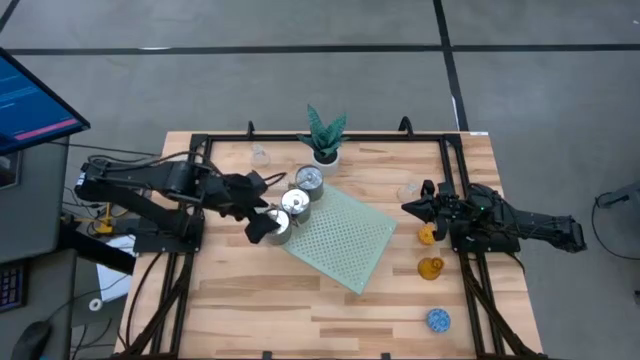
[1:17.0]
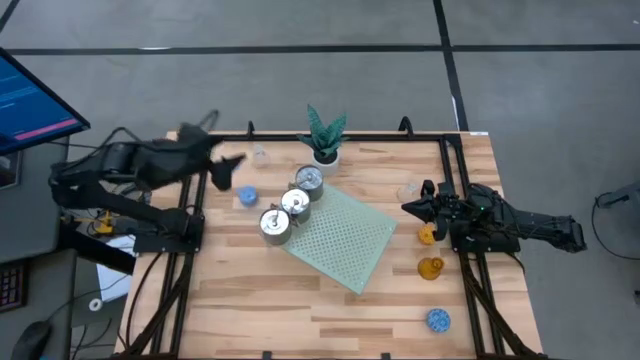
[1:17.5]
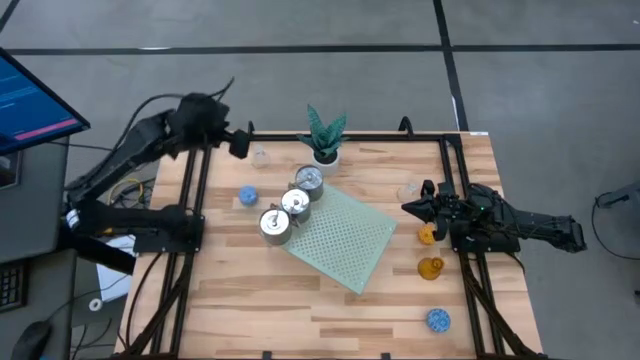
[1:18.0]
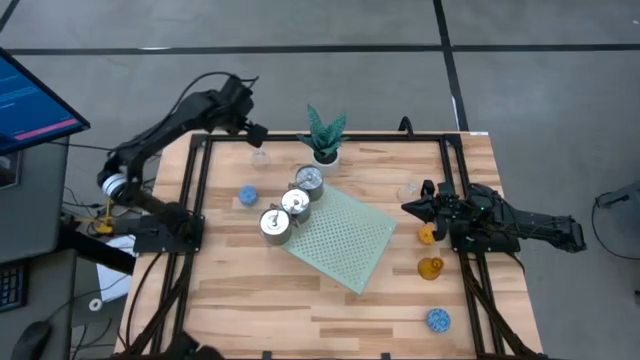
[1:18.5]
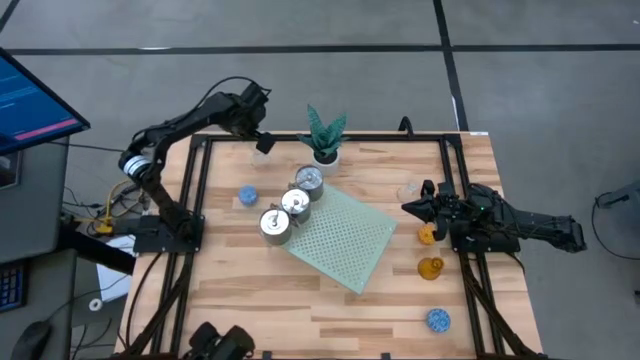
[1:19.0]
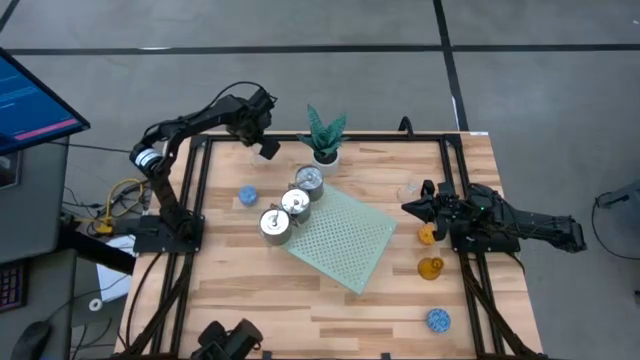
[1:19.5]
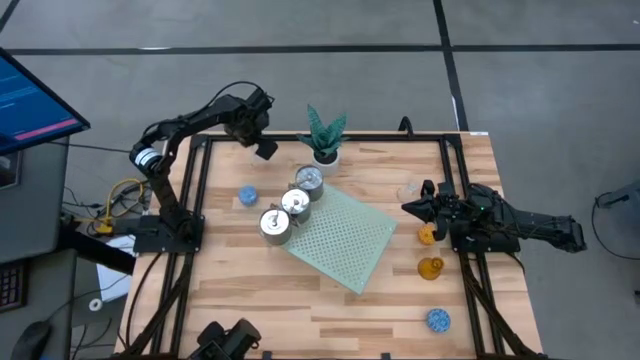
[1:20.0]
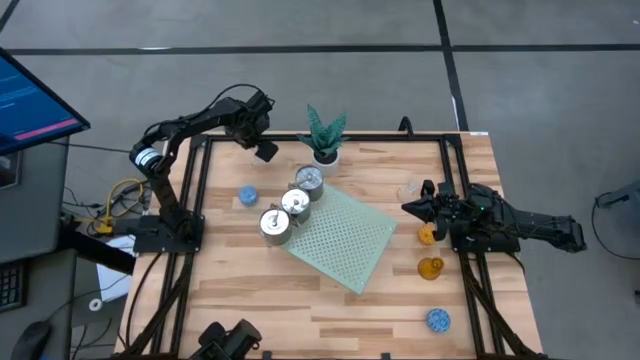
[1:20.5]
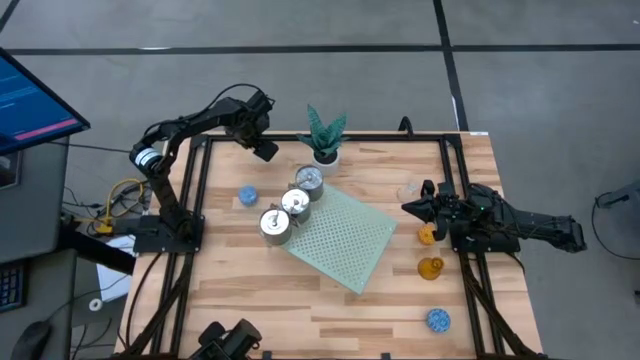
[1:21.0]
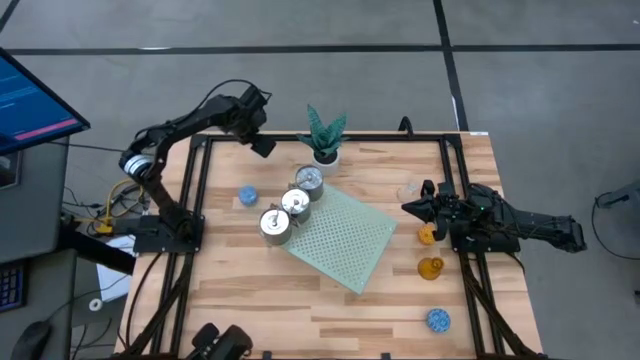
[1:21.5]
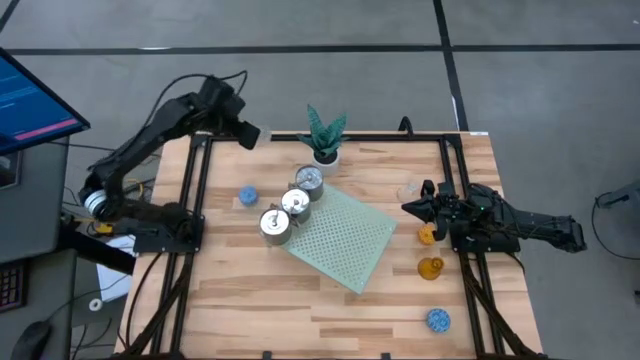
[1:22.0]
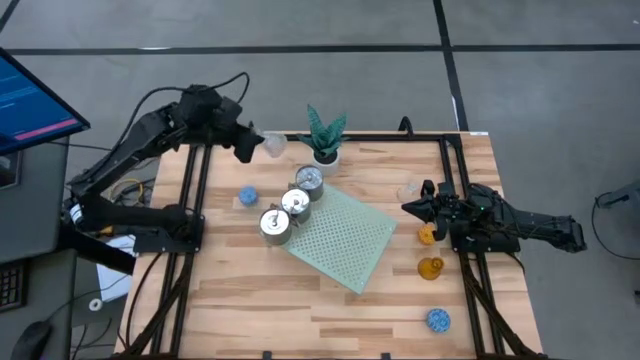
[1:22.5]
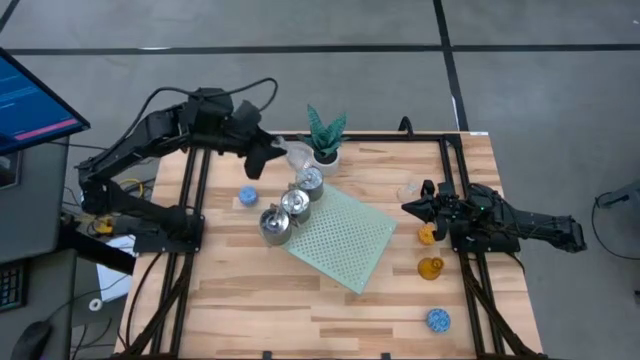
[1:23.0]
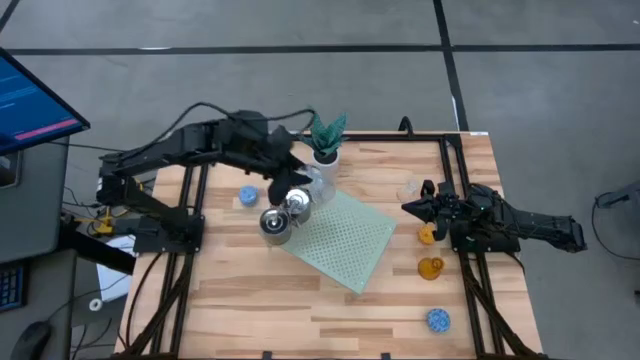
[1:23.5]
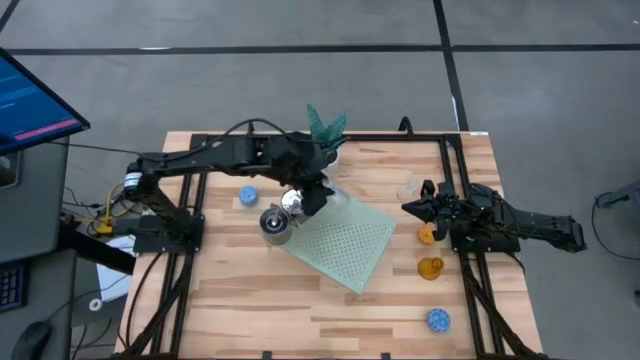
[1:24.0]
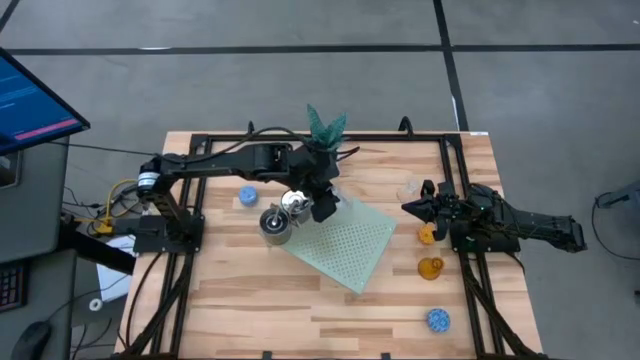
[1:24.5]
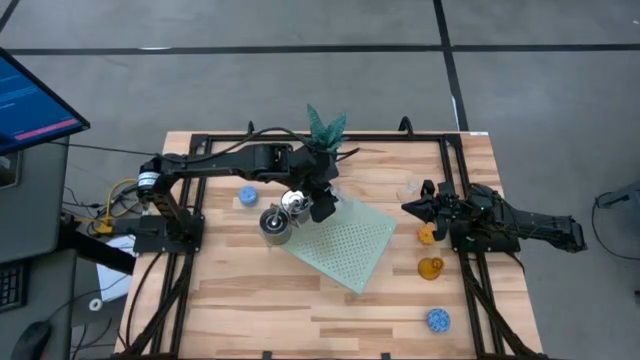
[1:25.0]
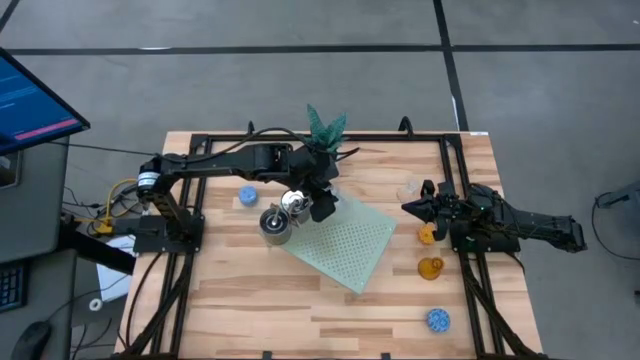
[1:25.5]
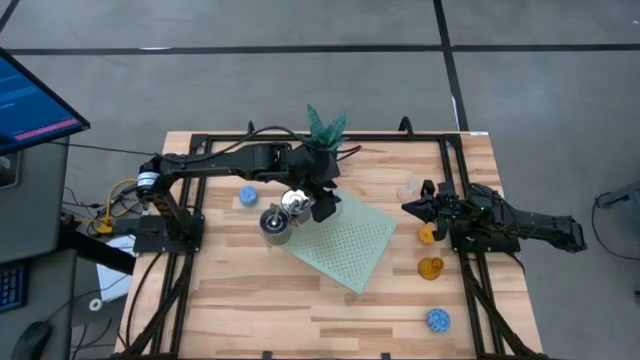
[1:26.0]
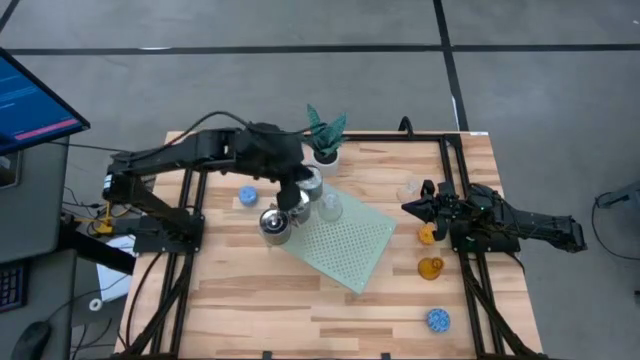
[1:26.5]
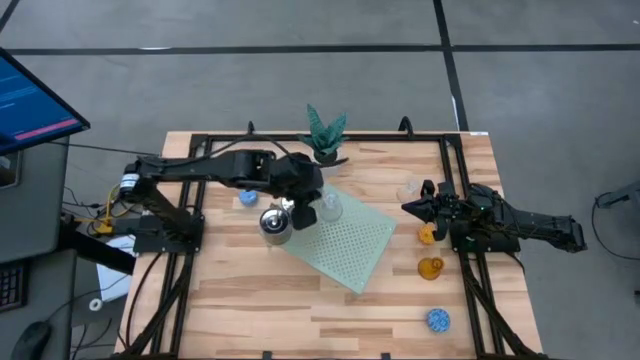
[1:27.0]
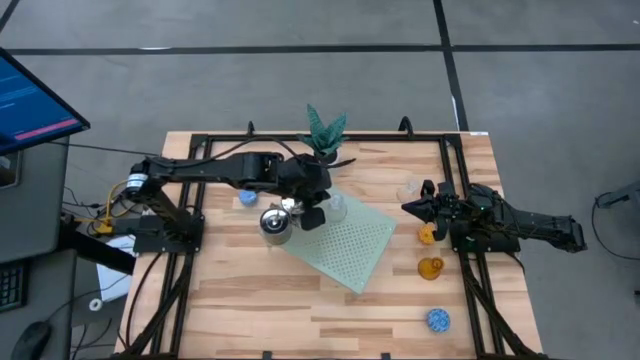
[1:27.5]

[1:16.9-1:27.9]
Task: Pick & Place candle stick holders
Put the top transparent candle holder on the shelf

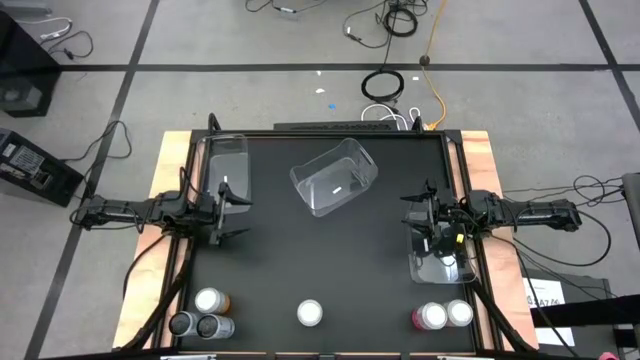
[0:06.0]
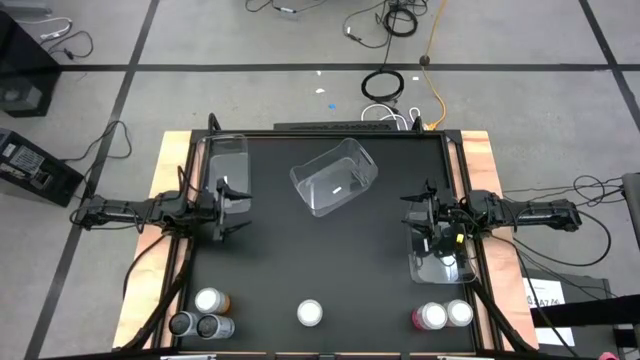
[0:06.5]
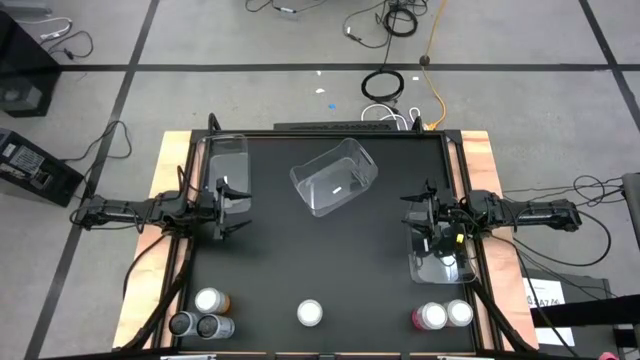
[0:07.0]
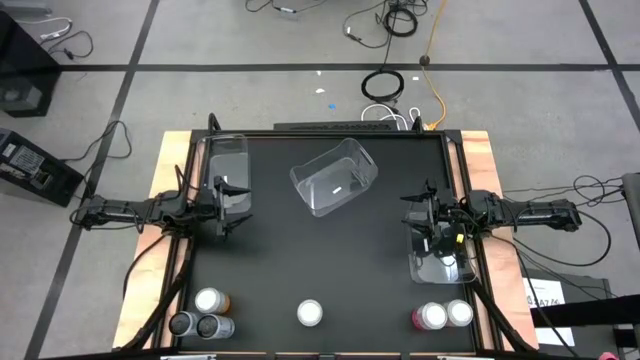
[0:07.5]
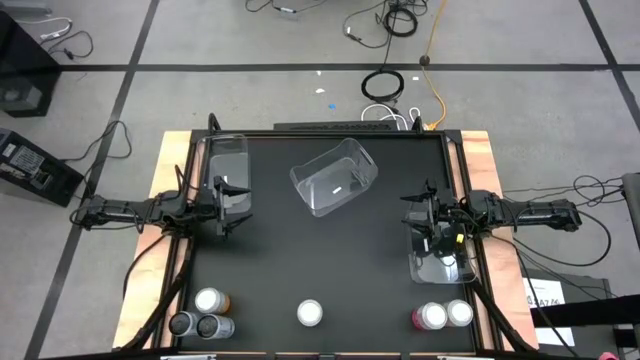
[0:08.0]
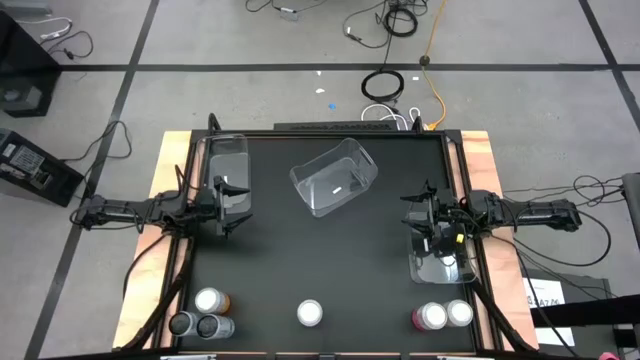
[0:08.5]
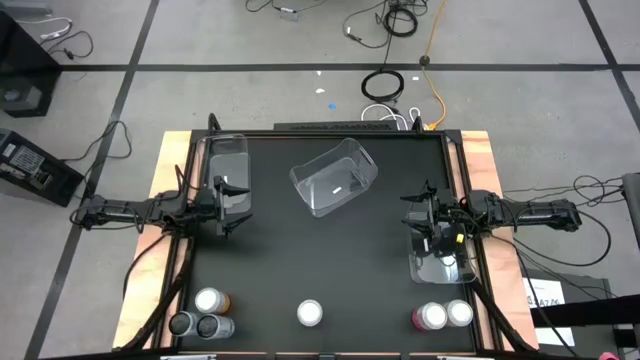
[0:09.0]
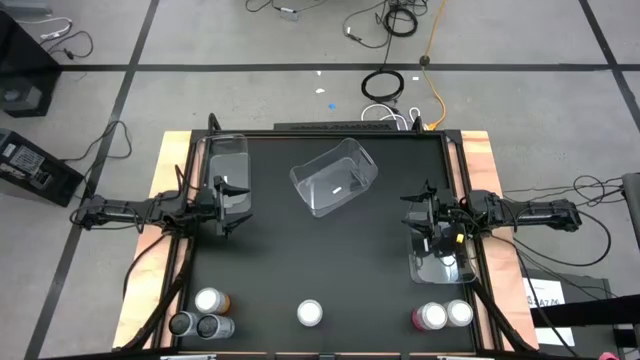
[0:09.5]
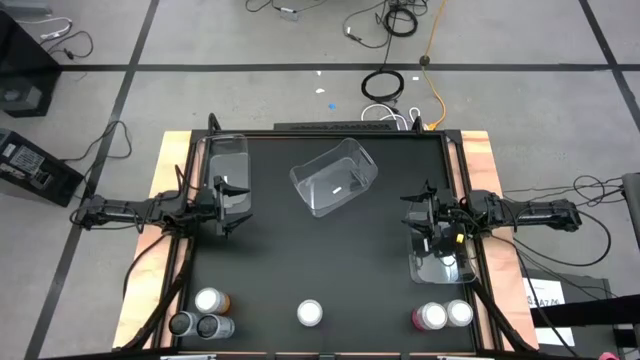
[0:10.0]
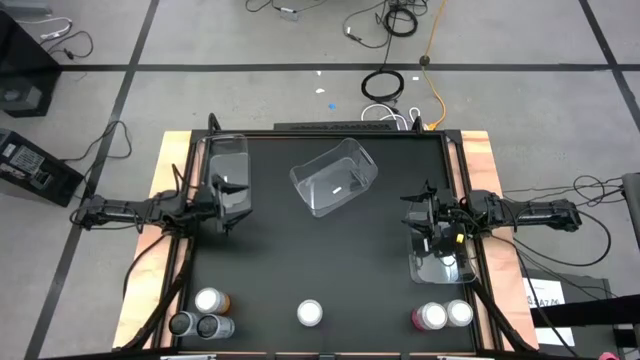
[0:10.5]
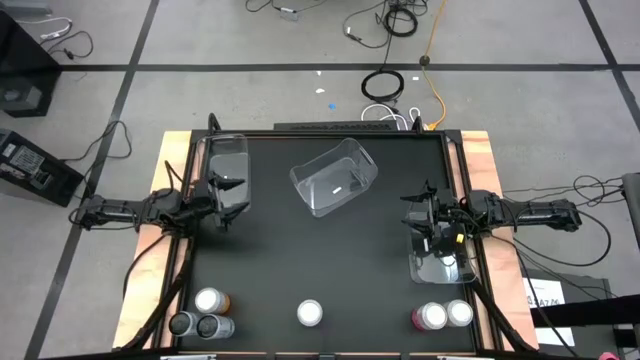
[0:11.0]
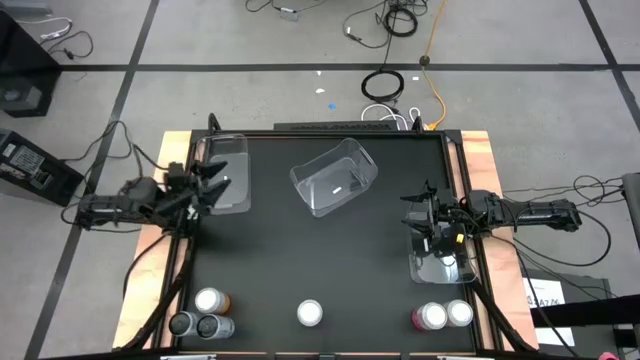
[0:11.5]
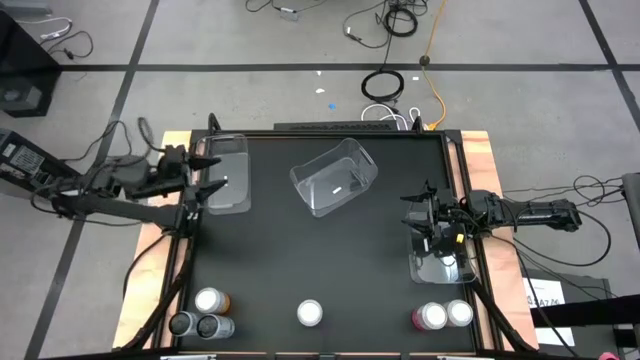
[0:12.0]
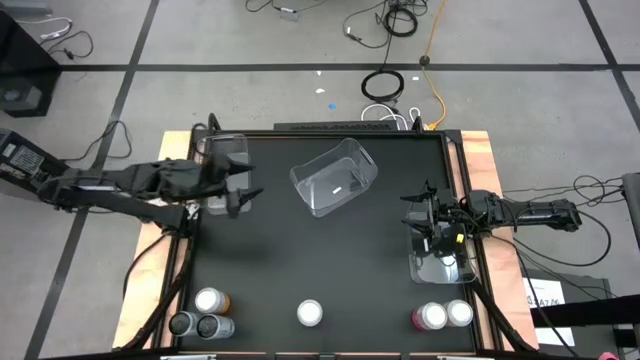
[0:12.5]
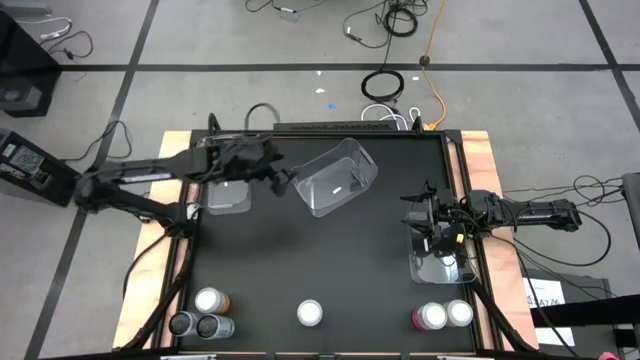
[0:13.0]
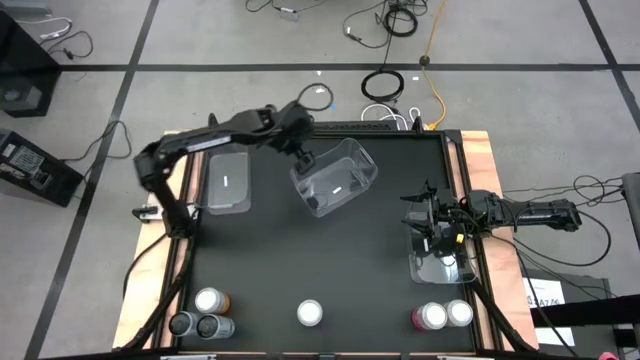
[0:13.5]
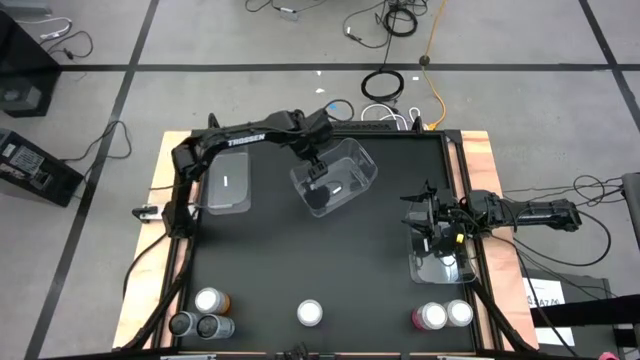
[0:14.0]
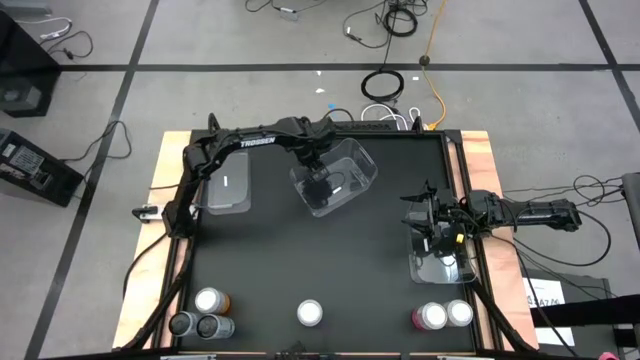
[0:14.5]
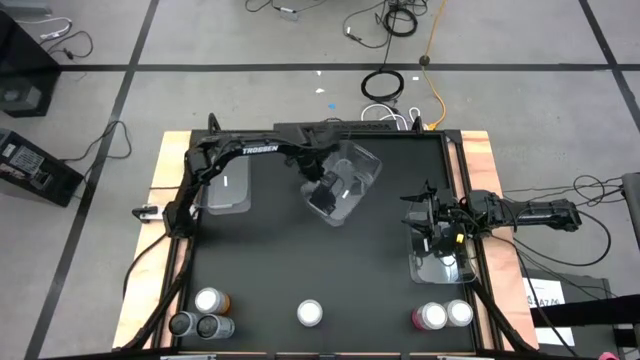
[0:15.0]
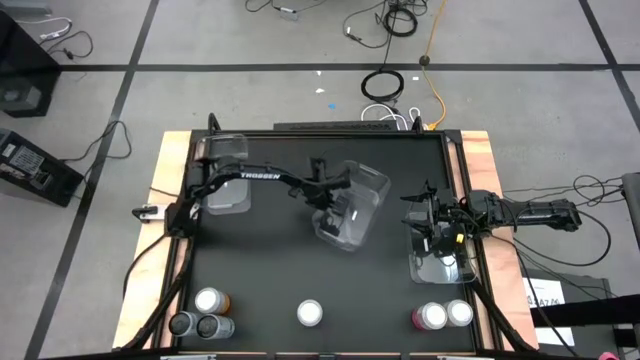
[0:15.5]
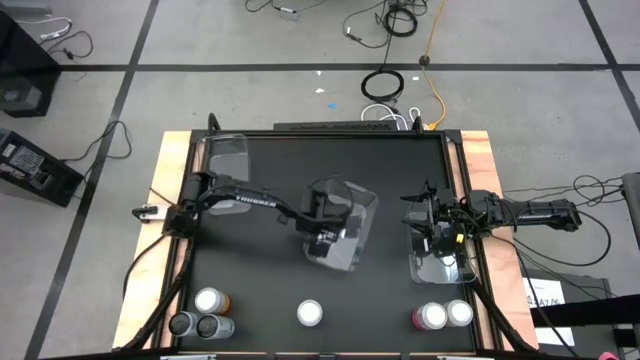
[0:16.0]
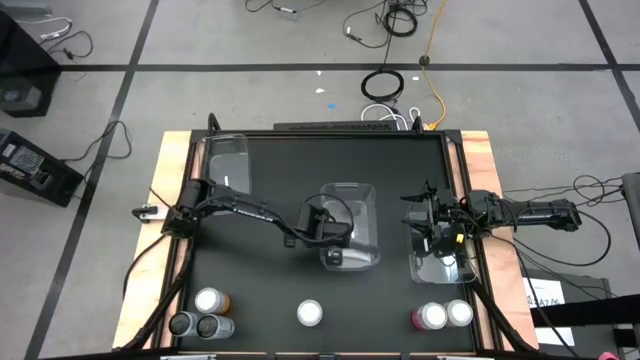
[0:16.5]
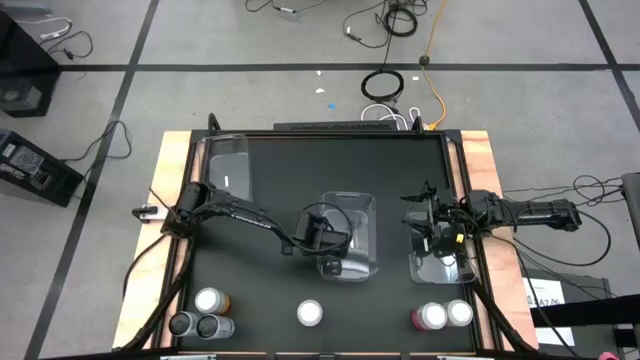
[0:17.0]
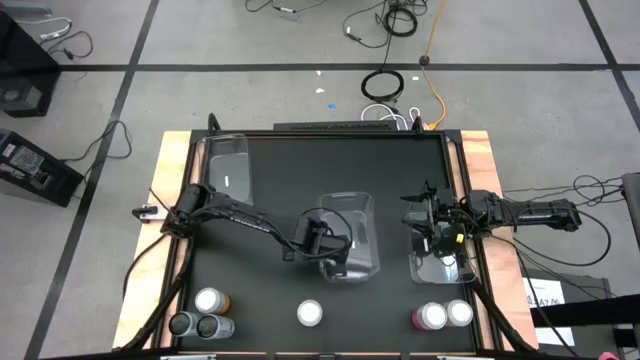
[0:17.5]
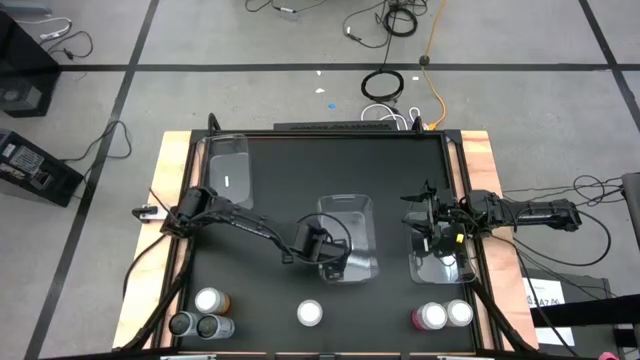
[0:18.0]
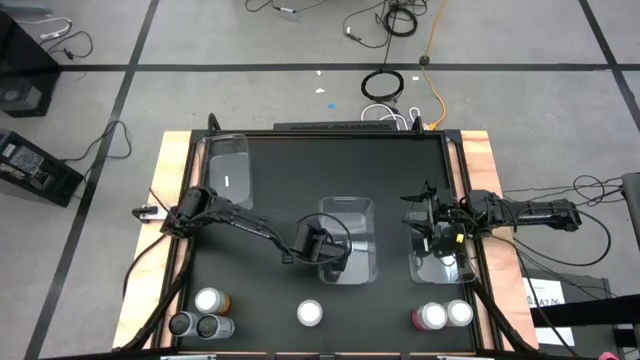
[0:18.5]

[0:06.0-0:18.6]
Task: Sort soda cans
Move the top transparent bin to the center
